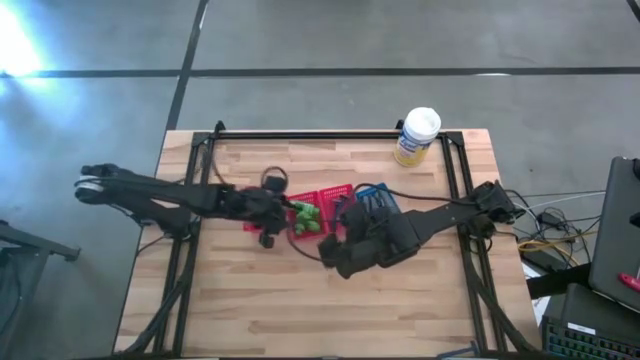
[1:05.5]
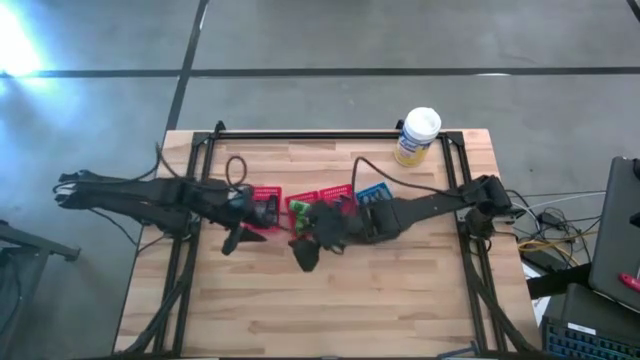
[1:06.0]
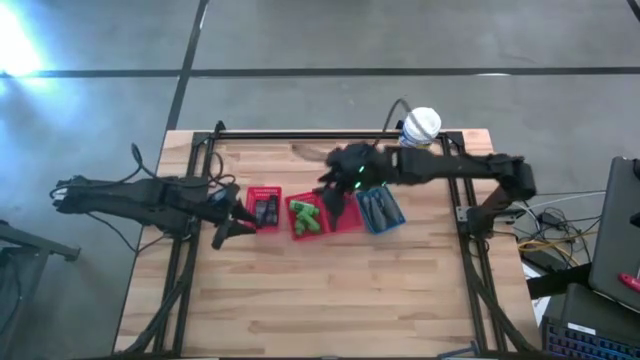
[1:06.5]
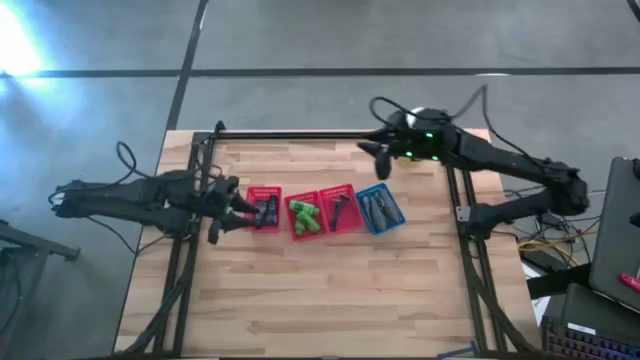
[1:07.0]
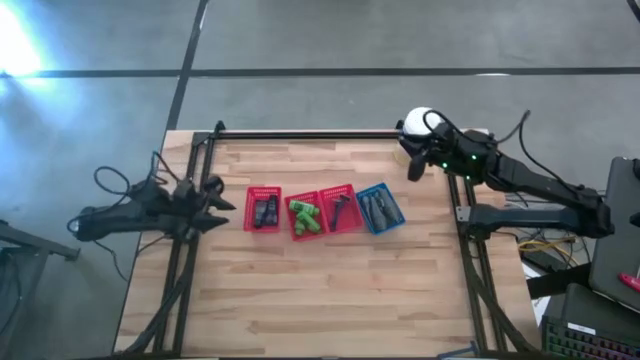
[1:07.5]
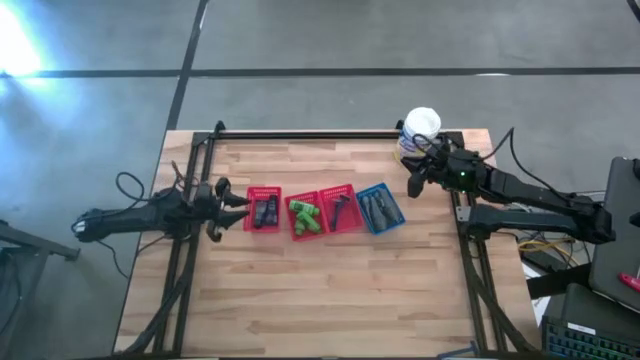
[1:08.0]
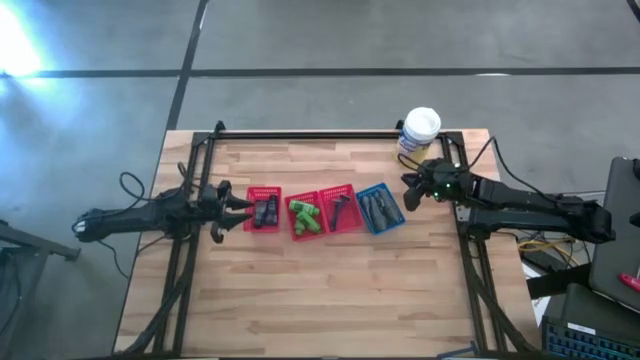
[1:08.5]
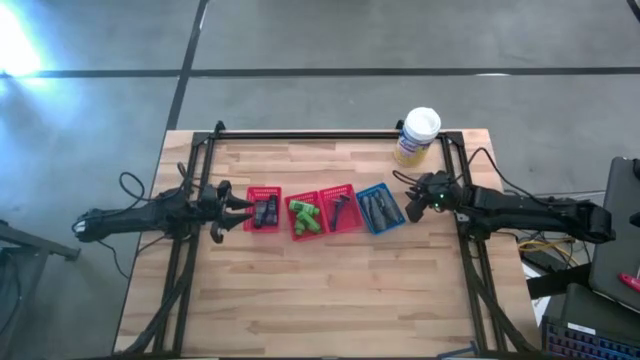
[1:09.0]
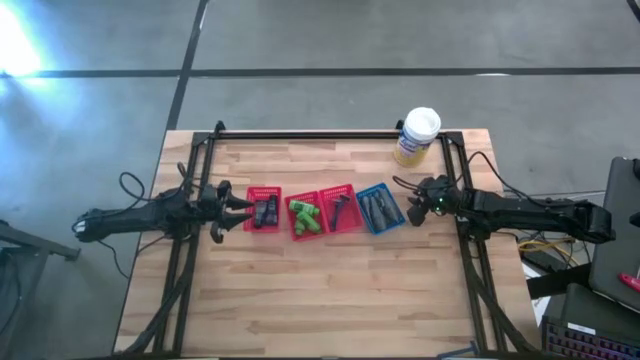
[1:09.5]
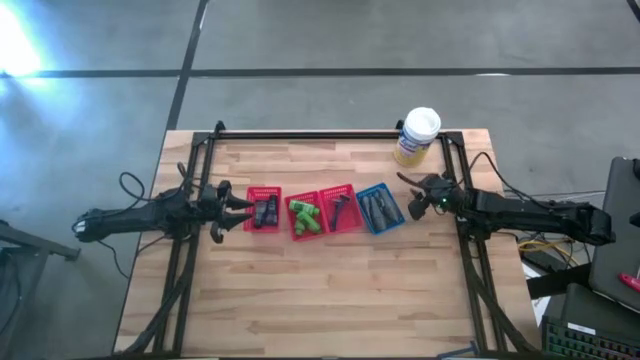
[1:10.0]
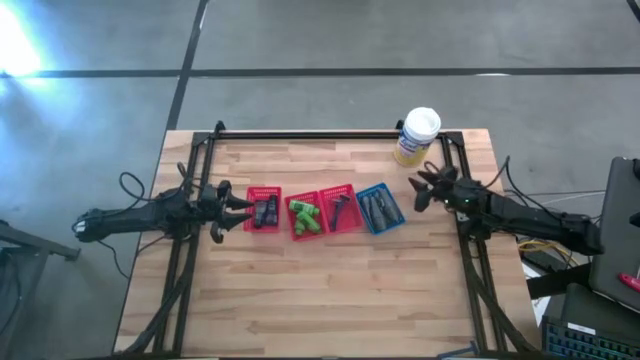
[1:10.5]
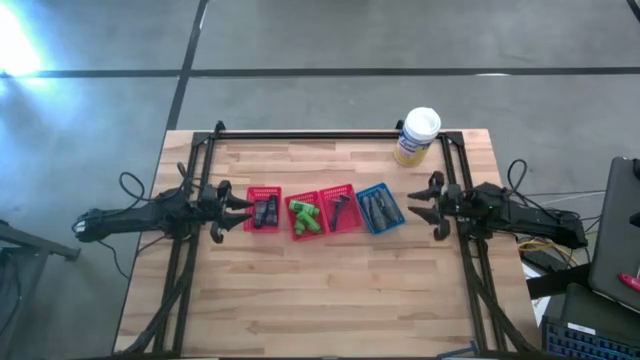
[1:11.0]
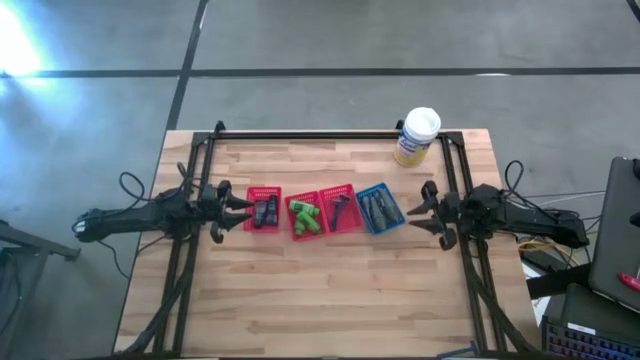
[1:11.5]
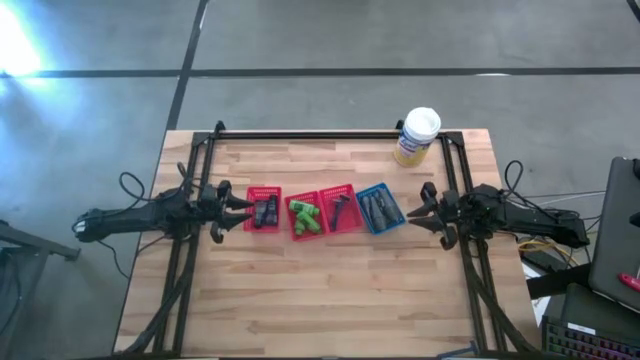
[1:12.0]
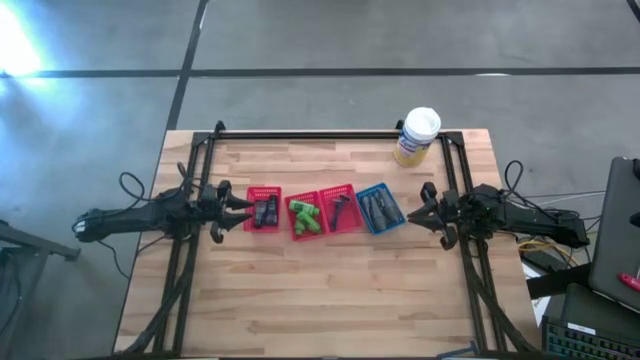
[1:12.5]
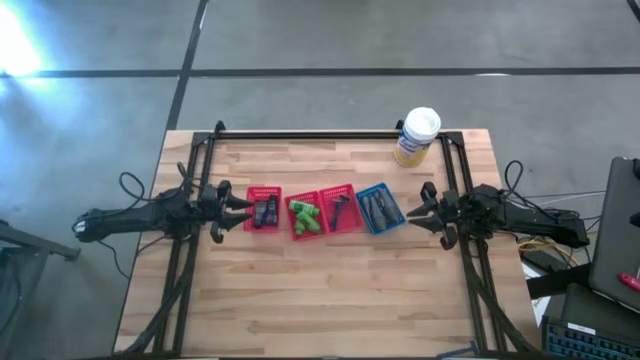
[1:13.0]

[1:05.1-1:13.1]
Task: Pick & Place Travel size toiletries
Return to Home Position

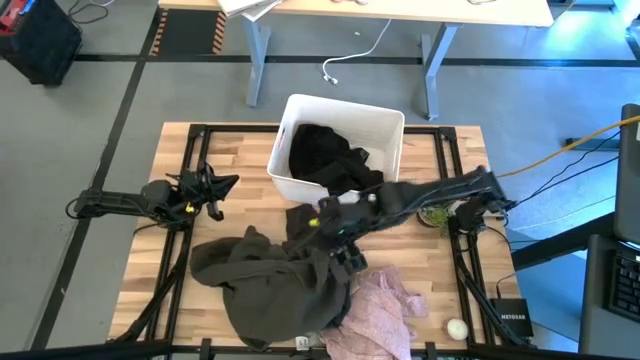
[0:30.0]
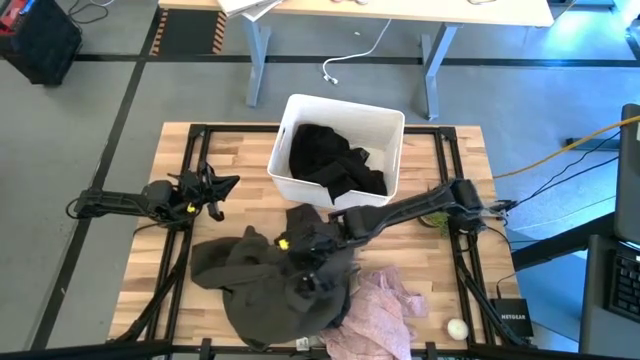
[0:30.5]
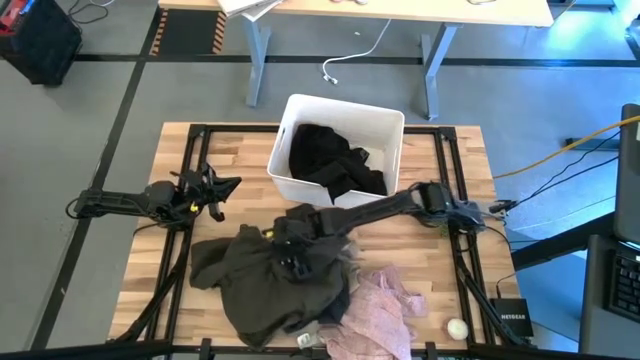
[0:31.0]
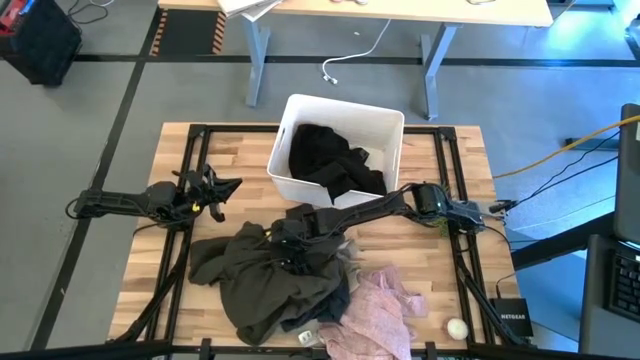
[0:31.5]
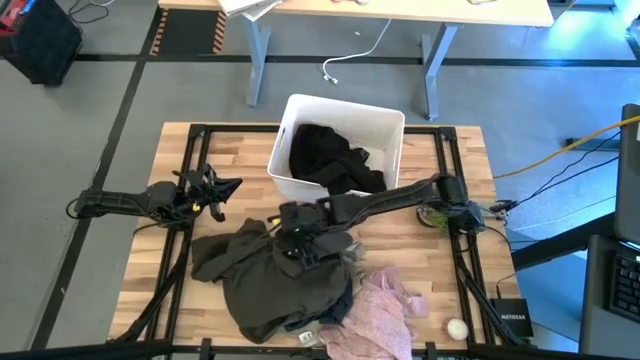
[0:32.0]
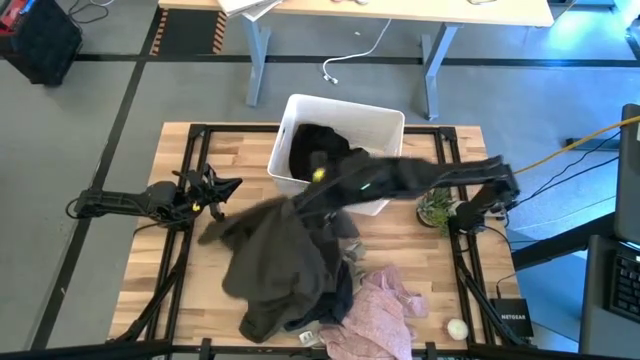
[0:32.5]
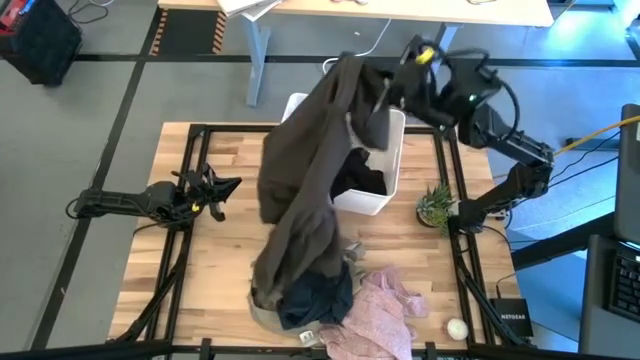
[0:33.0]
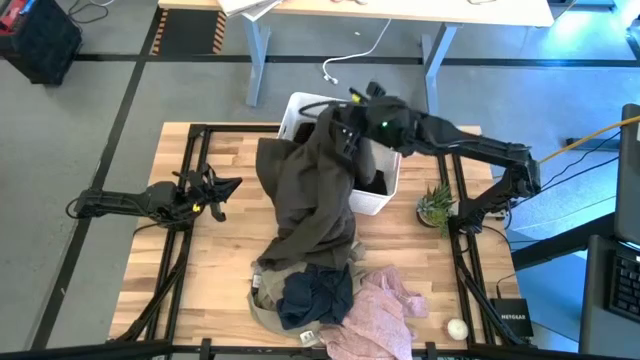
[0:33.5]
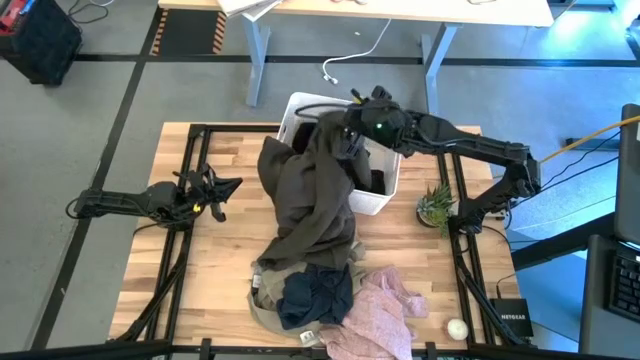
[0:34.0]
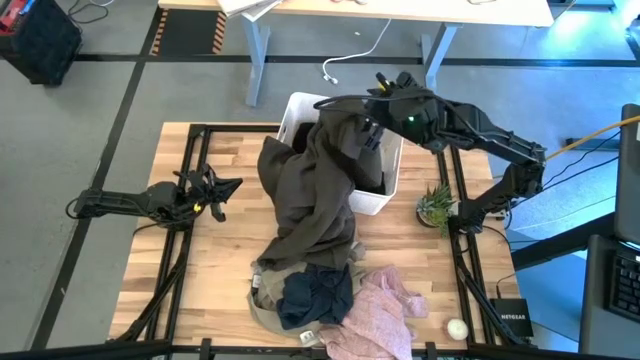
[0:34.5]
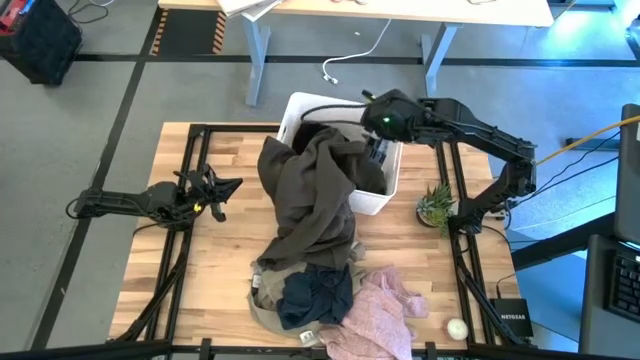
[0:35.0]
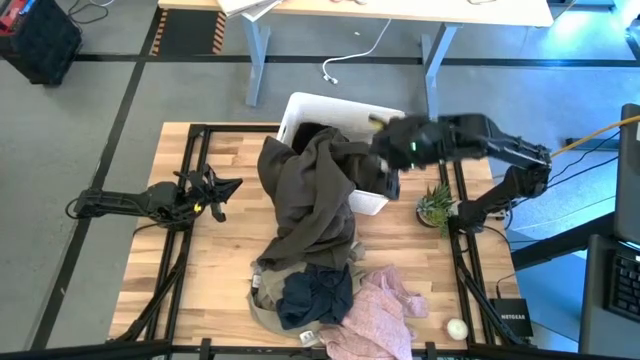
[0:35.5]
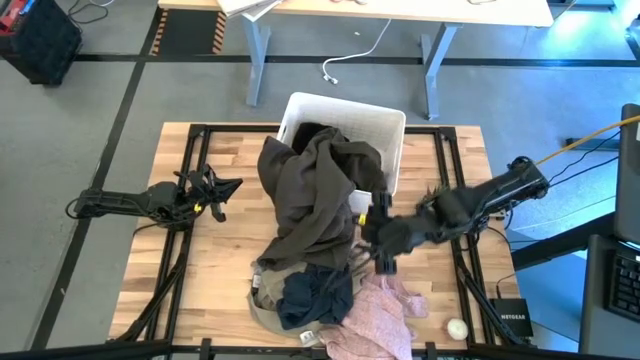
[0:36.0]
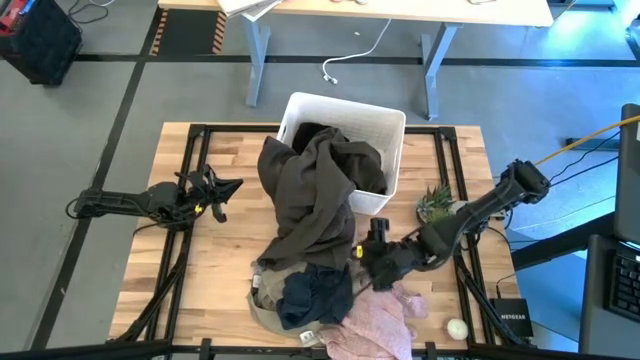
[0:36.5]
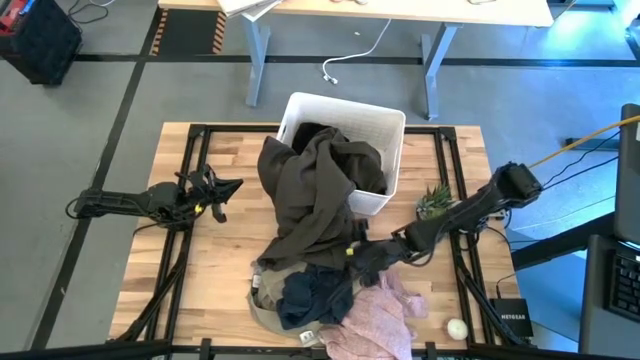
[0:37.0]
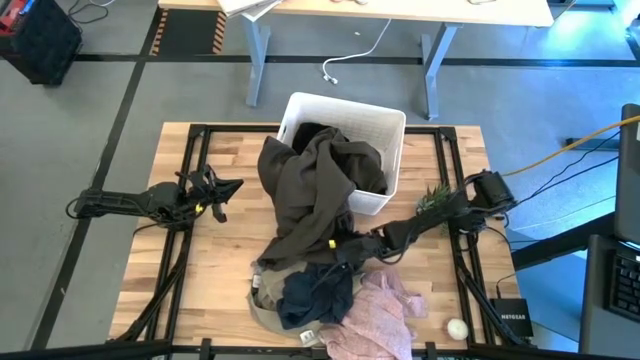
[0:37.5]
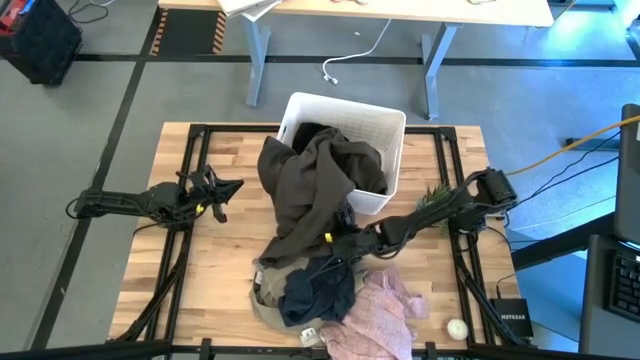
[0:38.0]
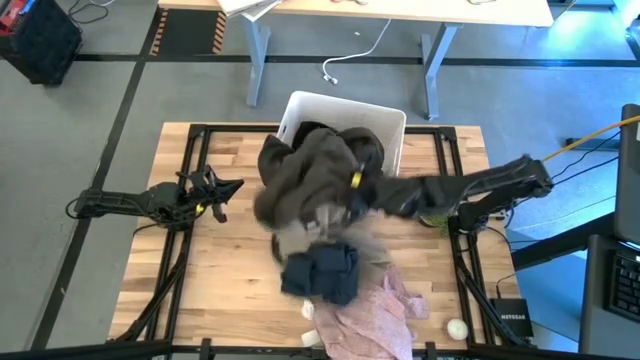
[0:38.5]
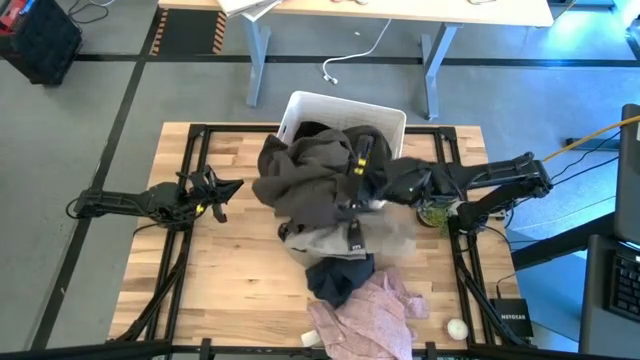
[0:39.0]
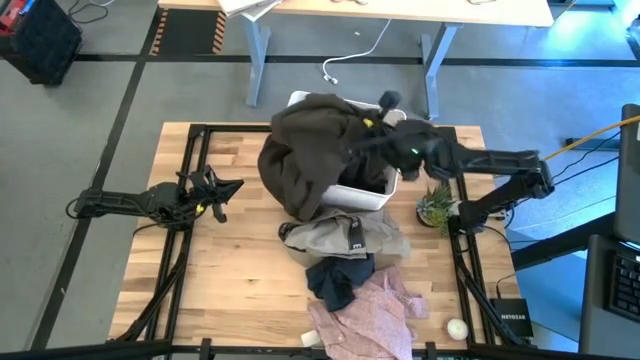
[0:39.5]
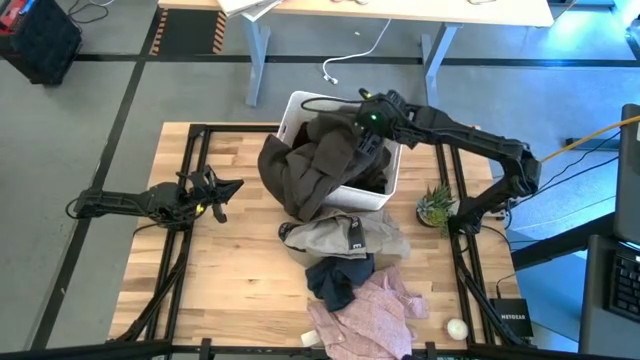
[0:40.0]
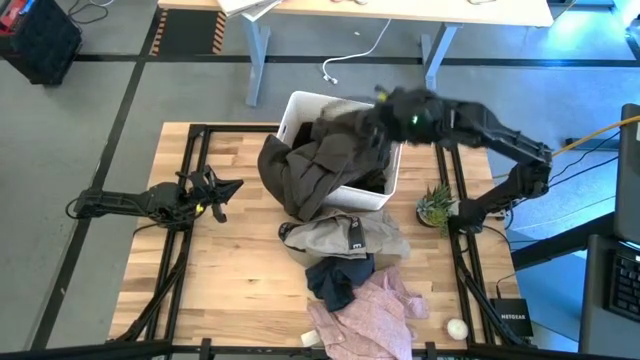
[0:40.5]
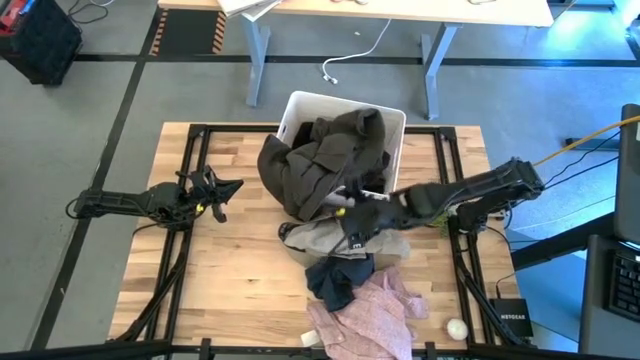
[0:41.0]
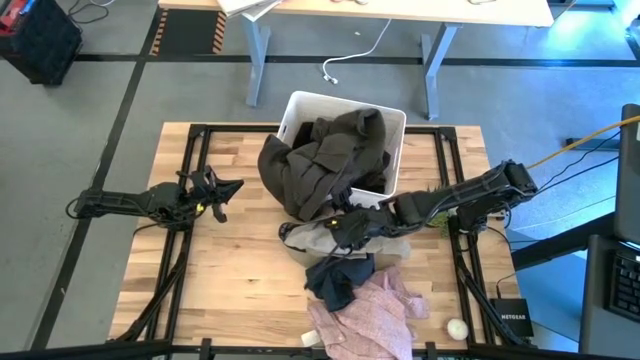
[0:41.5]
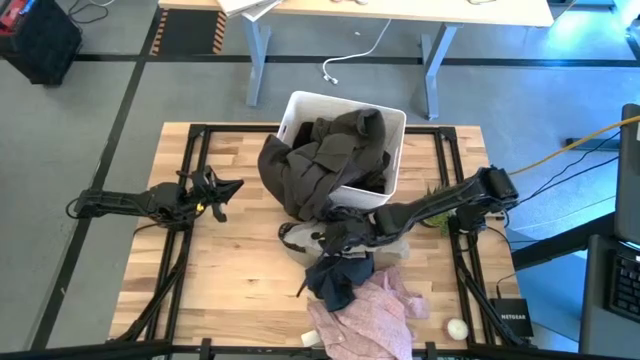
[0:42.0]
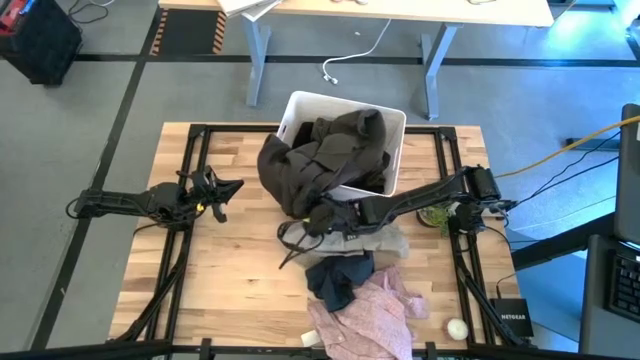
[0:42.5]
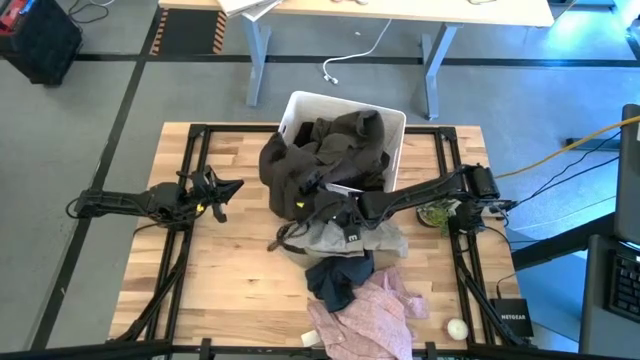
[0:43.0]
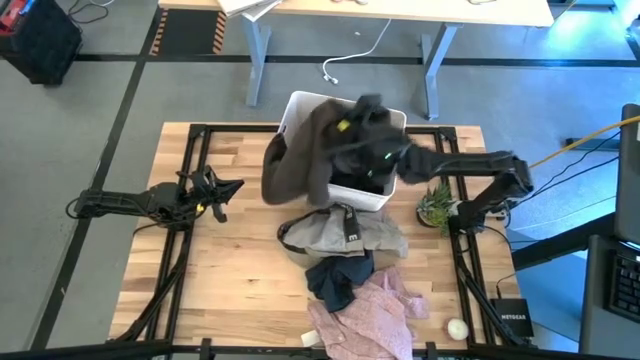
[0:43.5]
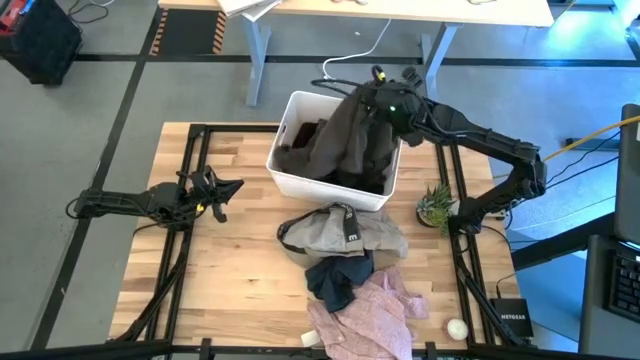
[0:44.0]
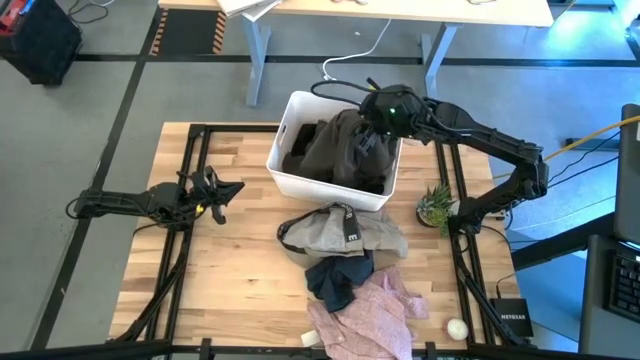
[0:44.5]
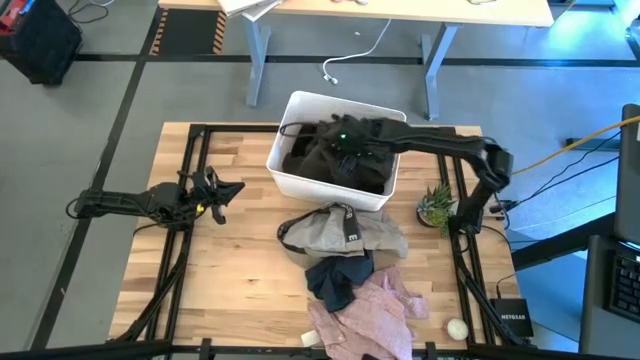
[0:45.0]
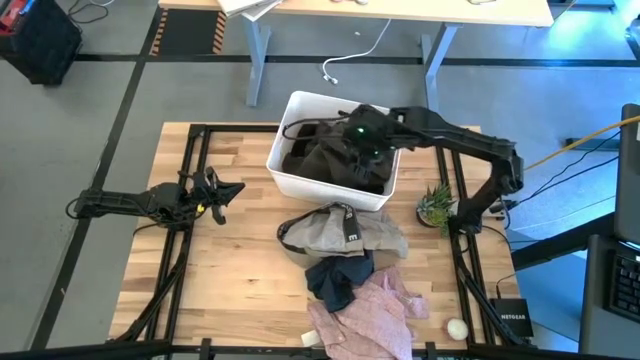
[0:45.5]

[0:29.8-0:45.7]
Task: Sort clothes
Put the gray hoodie into the white bin
